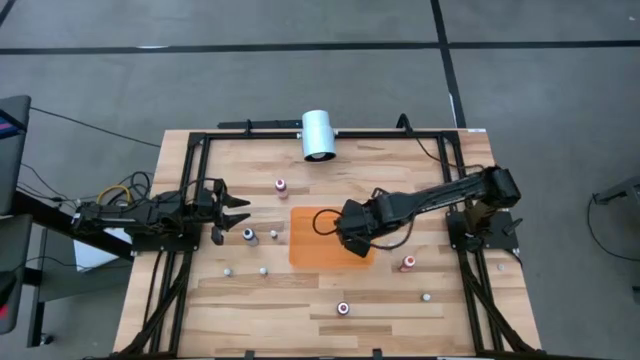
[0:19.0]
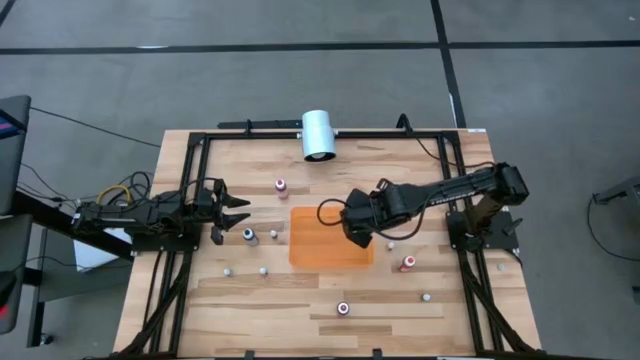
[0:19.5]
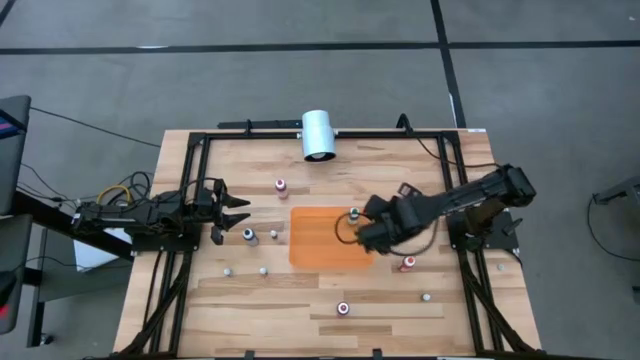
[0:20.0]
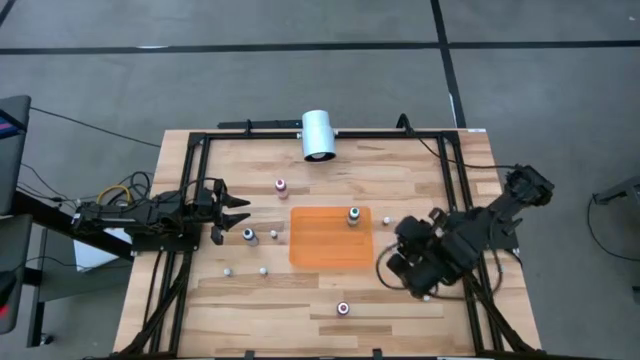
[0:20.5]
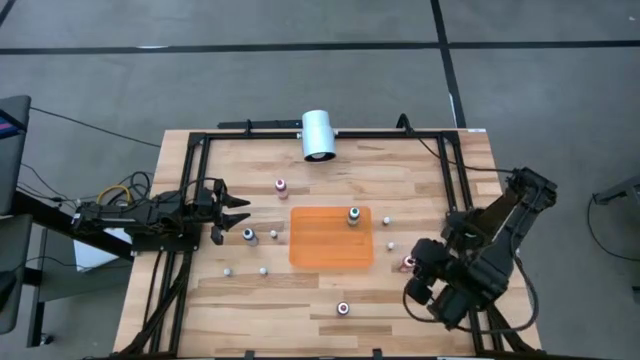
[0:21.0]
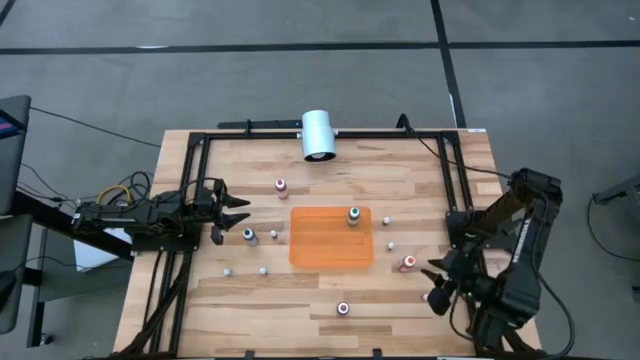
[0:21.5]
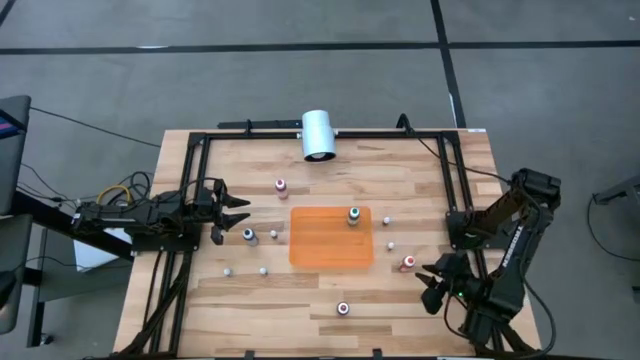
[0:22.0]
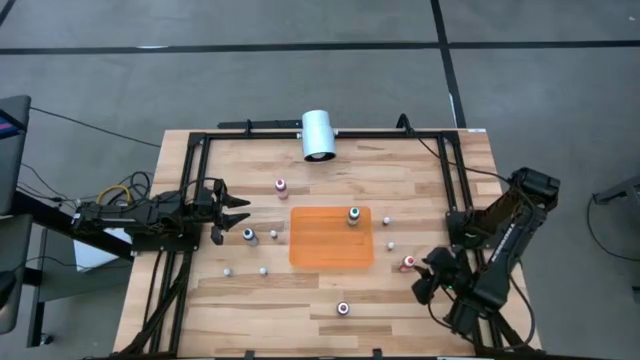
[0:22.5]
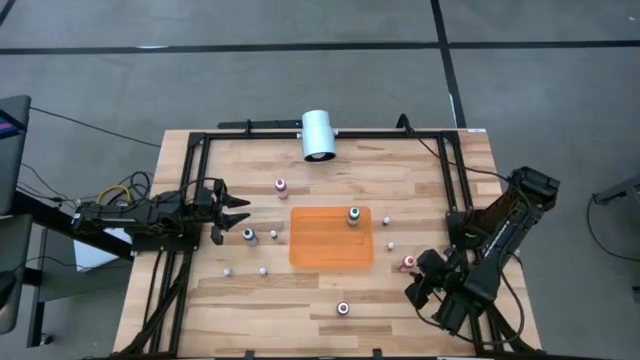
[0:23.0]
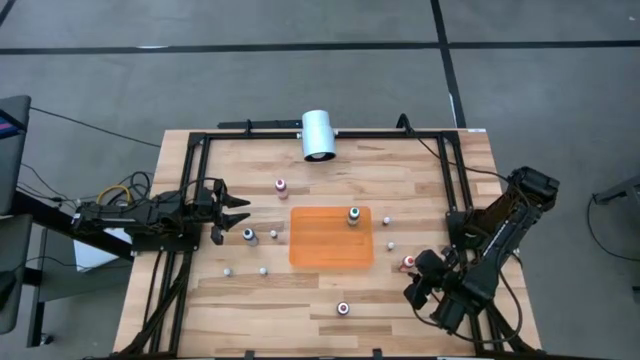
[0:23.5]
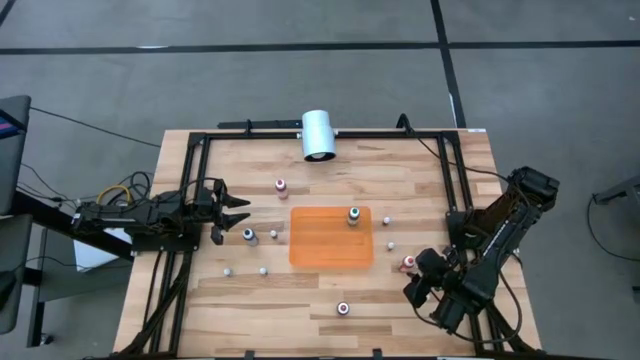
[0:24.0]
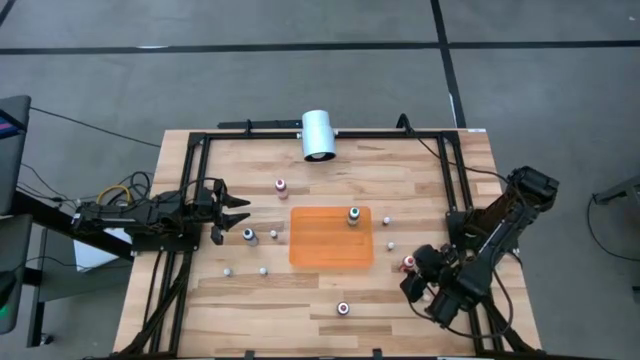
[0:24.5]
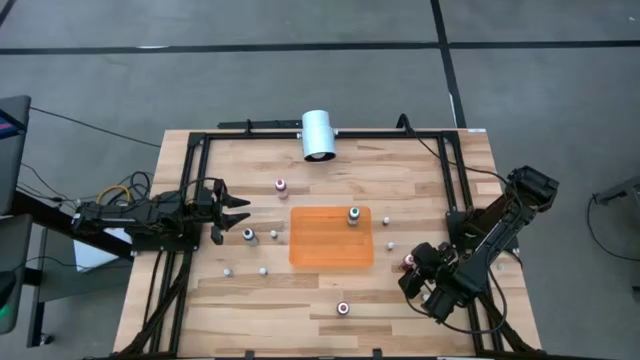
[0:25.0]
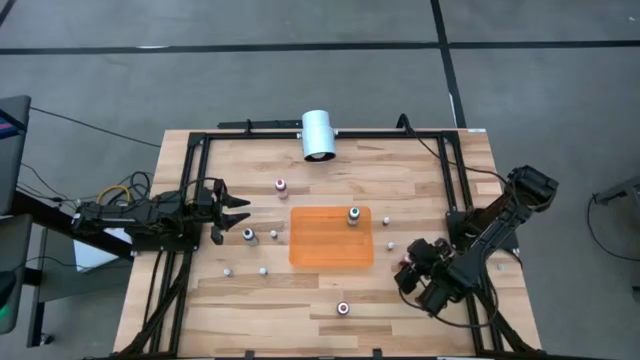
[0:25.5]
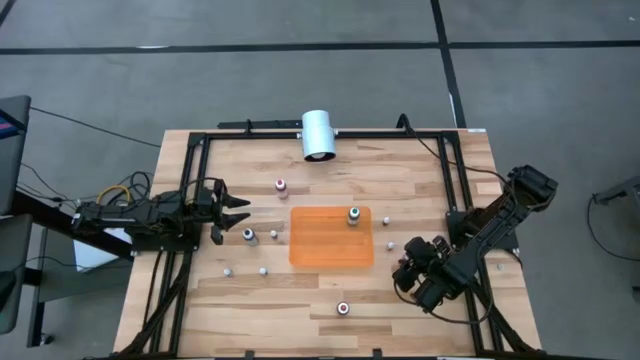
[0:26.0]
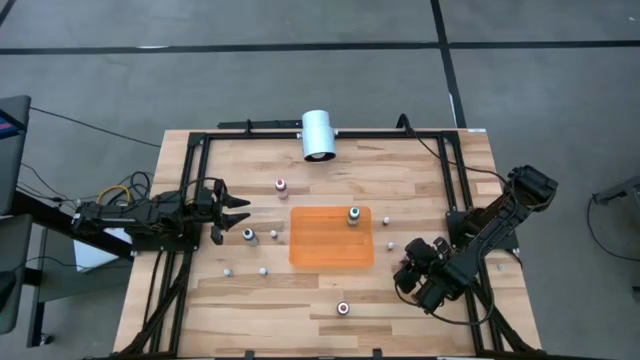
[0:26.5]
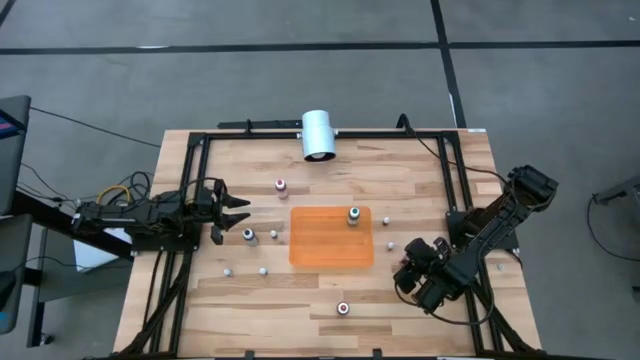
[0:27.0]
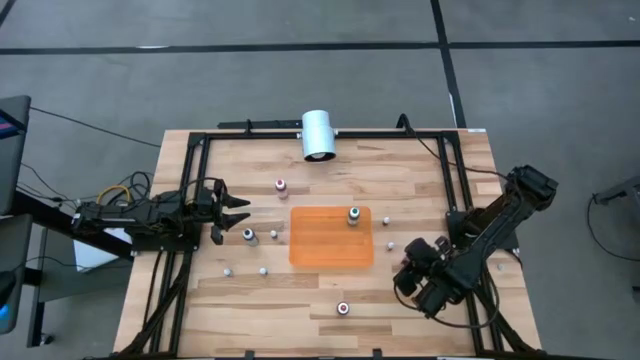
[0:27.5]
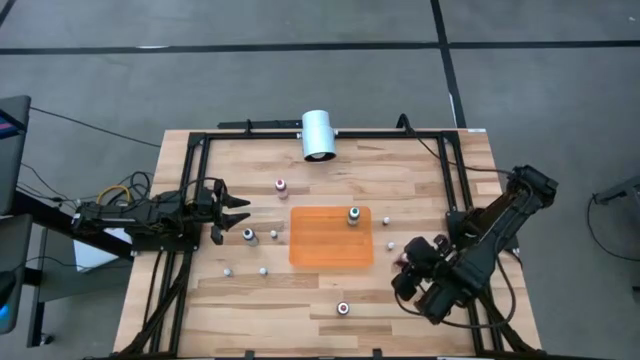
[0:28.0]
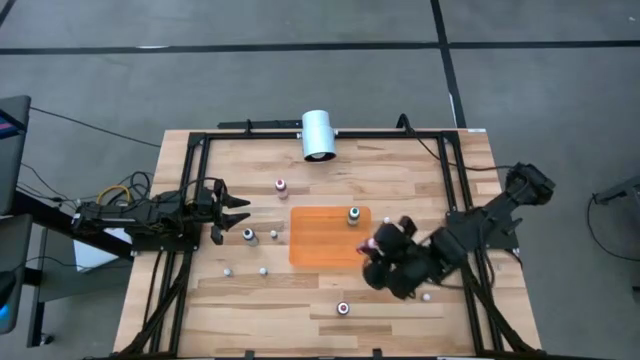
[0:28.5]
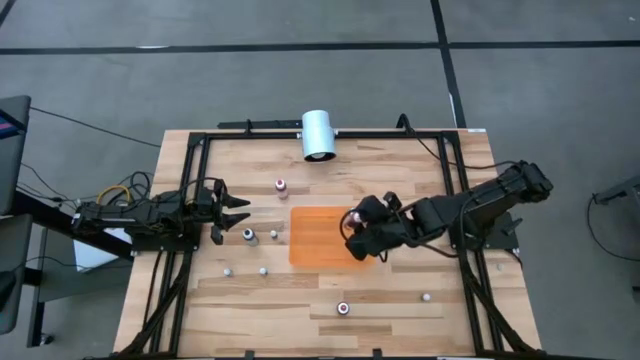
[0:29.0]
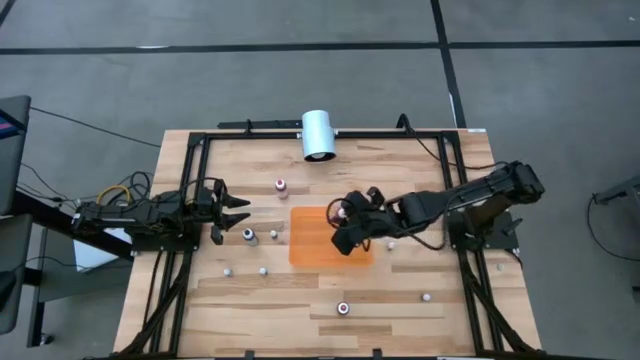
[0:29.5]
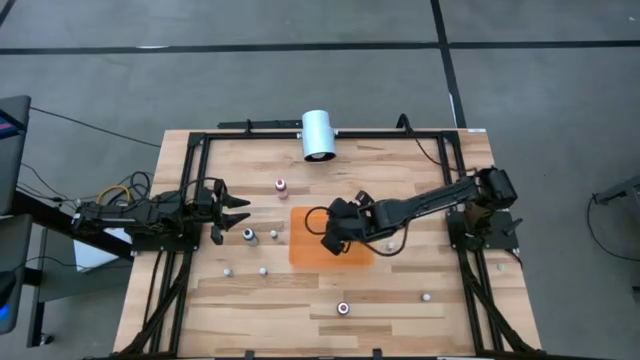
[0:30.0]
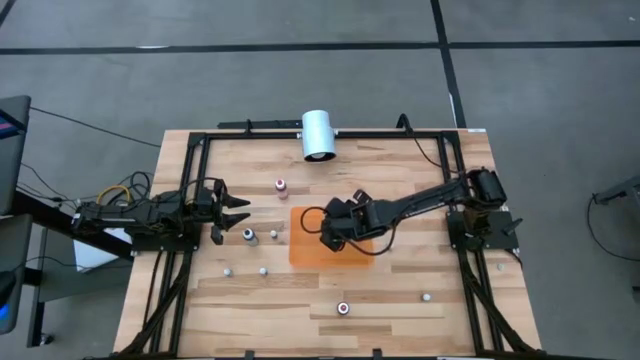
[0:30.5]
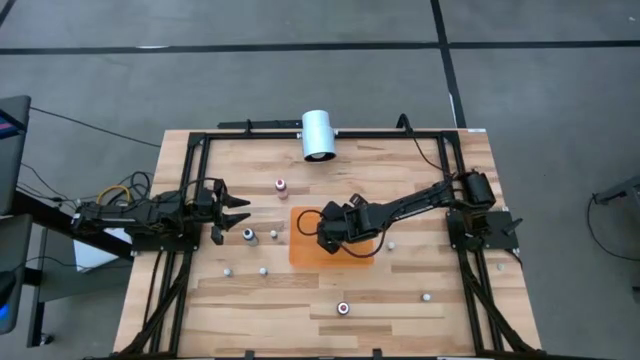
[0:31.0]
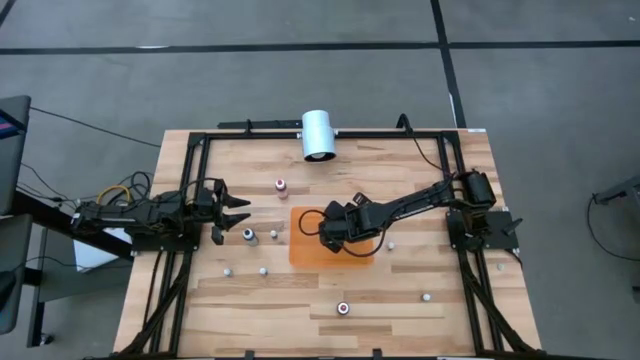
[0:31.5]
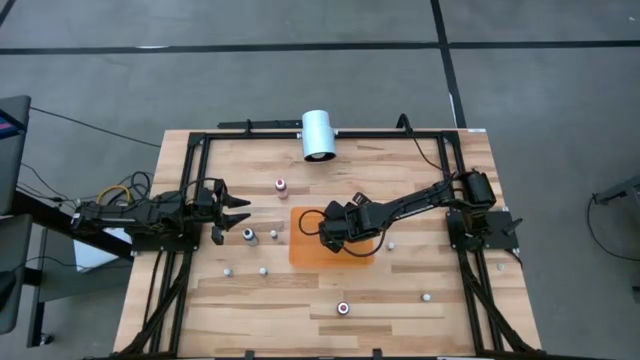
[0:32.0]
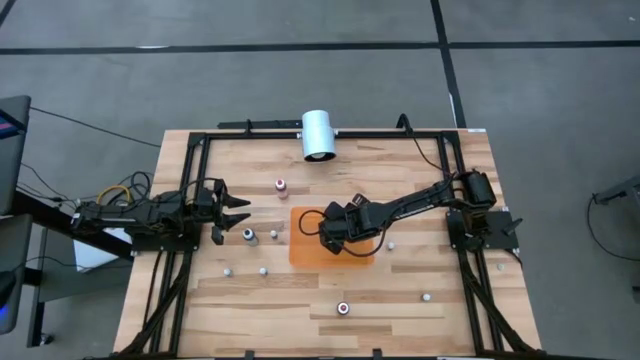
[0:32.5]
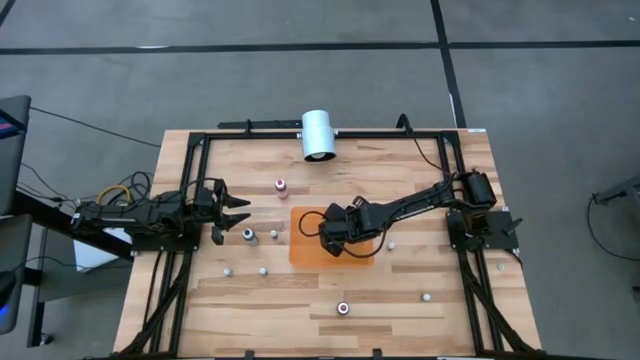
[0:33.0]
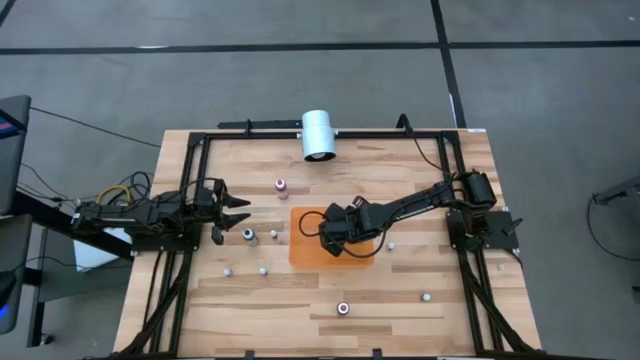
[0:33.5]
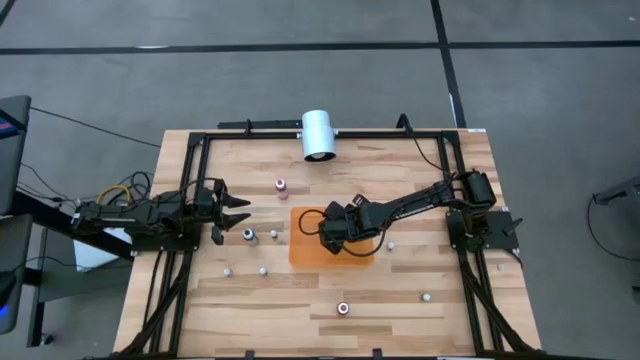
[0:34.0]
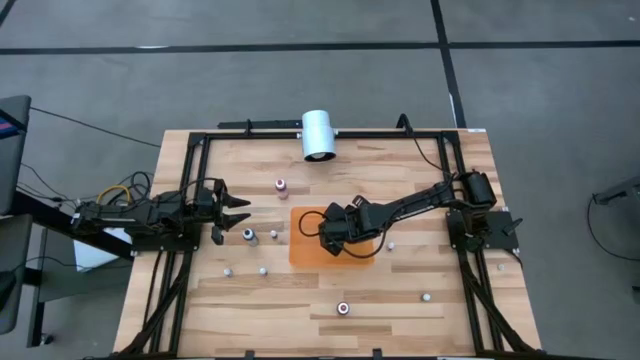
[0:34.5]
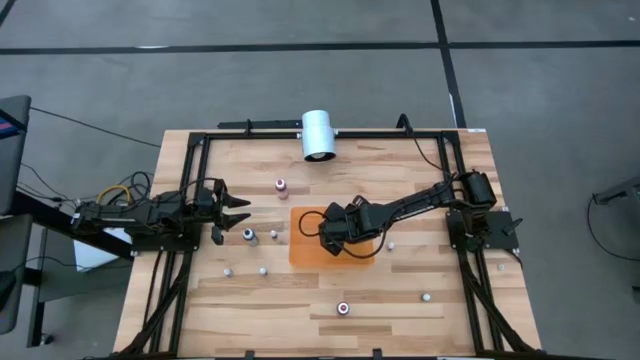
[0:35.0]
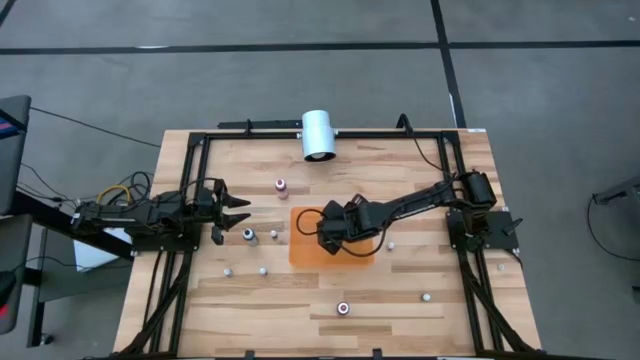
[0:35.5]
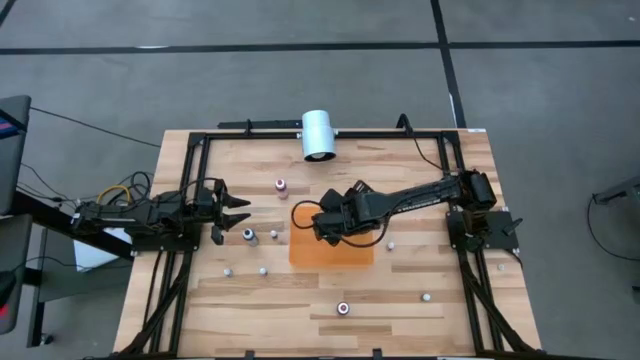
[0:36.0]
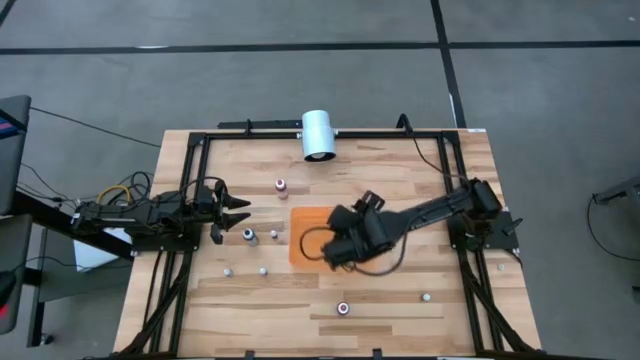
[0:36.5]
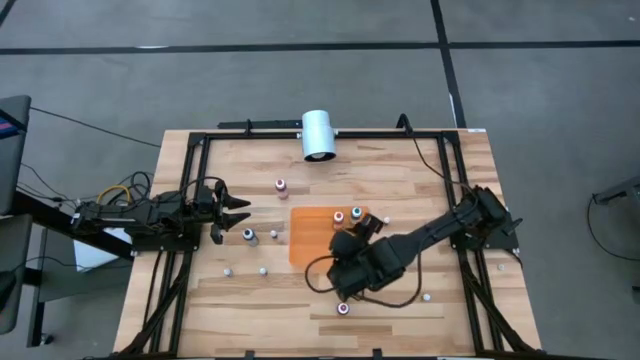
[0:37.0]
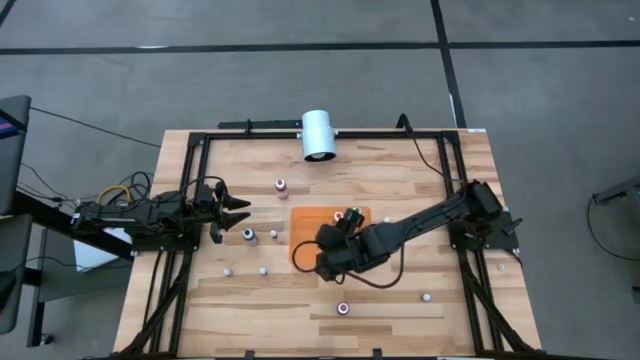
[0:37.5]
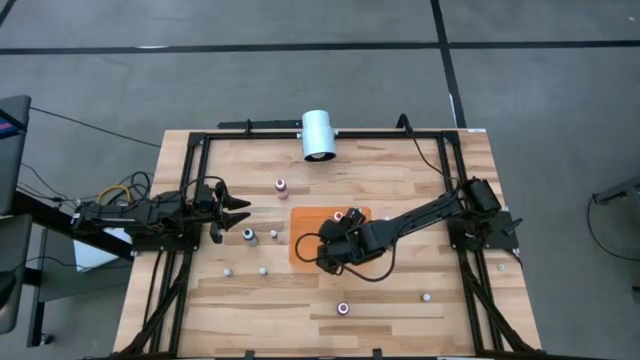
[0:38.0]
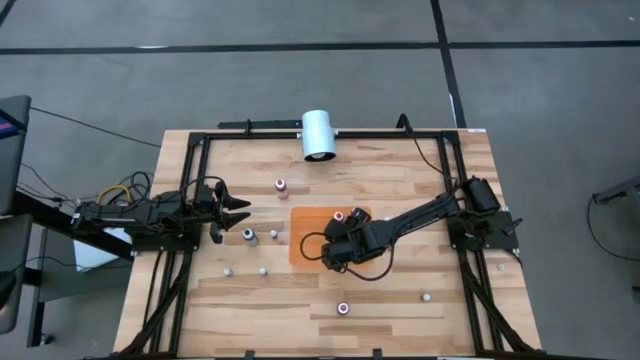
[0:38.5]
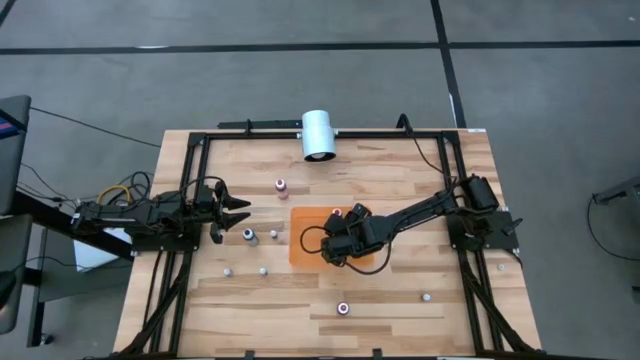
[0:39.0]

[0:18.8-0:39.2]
Task: Pick & Place food coloring
Put the large orange food coloring into the orange bin
